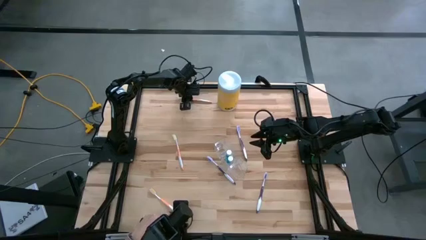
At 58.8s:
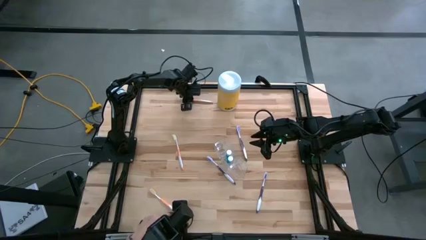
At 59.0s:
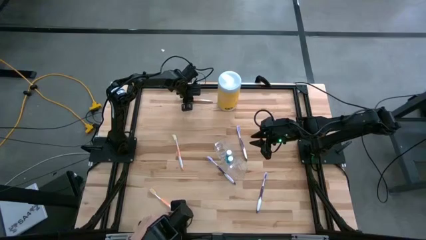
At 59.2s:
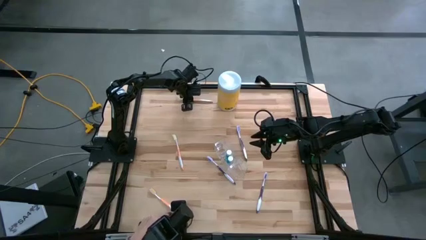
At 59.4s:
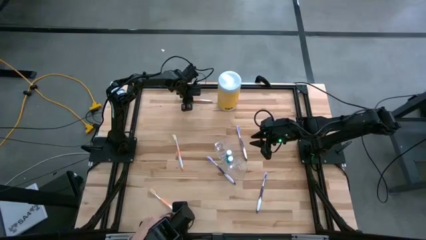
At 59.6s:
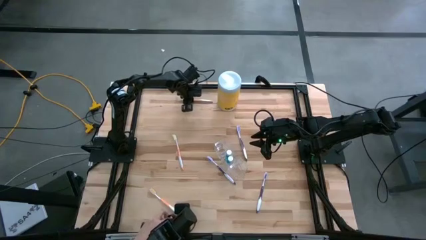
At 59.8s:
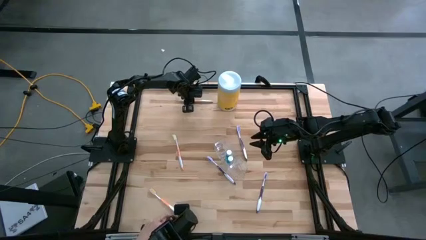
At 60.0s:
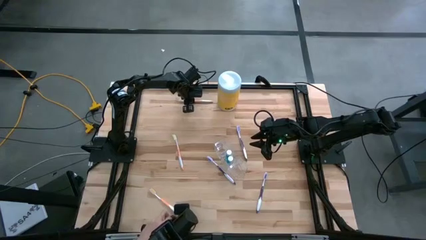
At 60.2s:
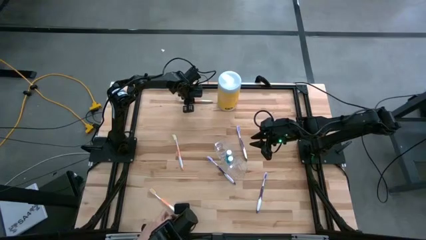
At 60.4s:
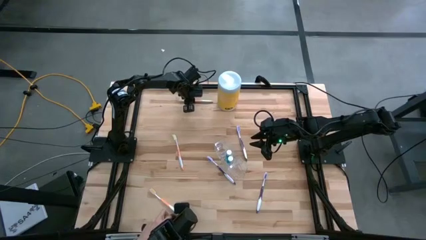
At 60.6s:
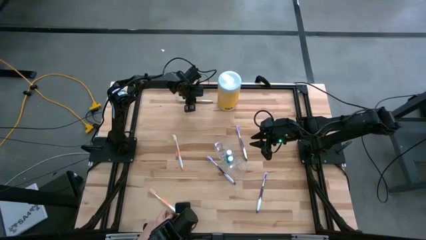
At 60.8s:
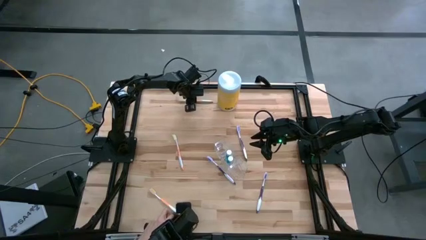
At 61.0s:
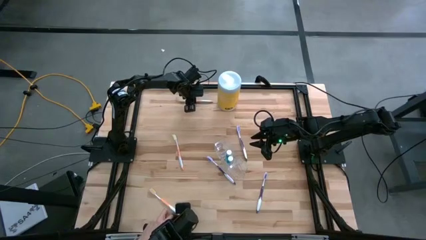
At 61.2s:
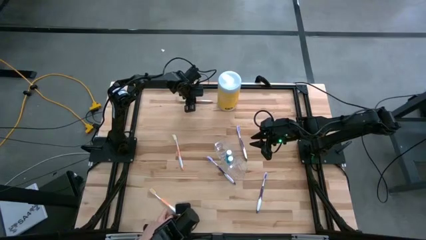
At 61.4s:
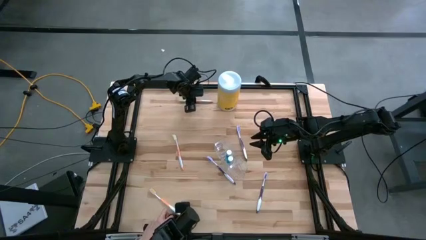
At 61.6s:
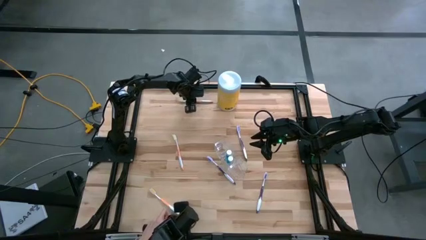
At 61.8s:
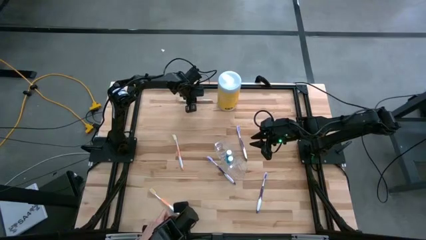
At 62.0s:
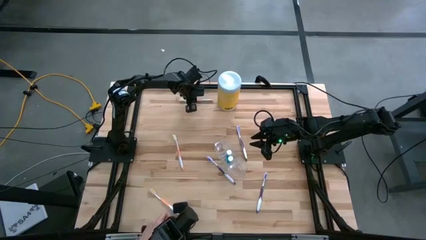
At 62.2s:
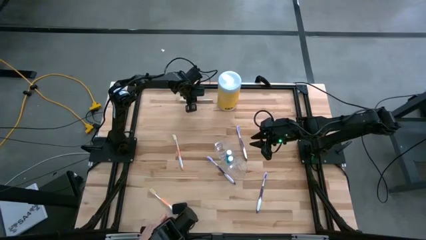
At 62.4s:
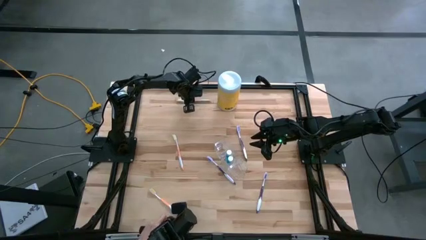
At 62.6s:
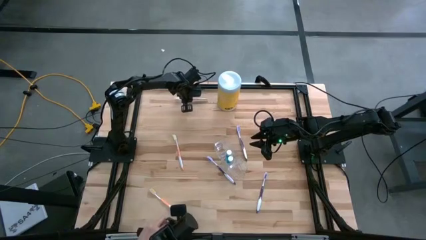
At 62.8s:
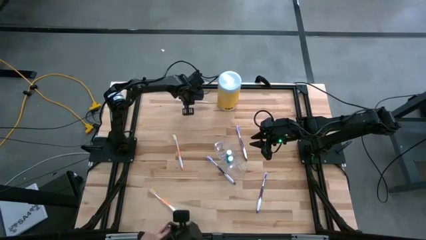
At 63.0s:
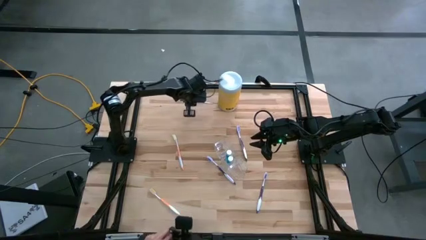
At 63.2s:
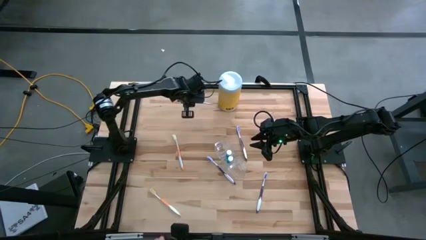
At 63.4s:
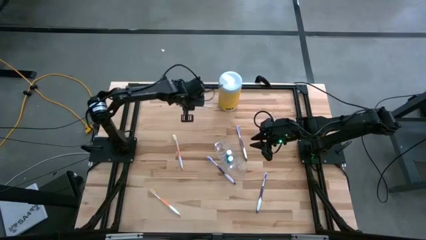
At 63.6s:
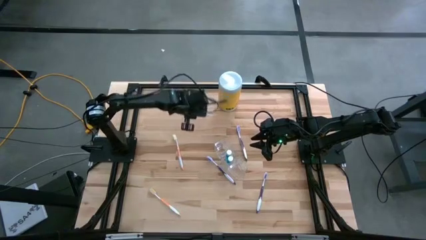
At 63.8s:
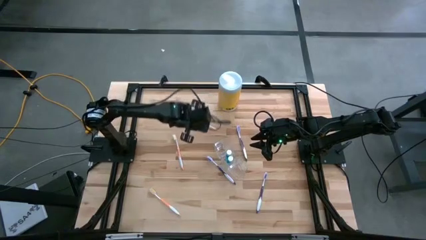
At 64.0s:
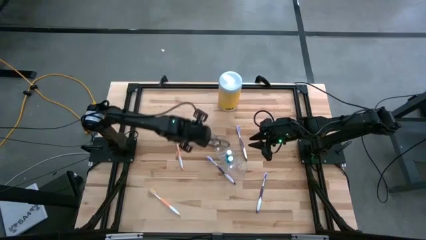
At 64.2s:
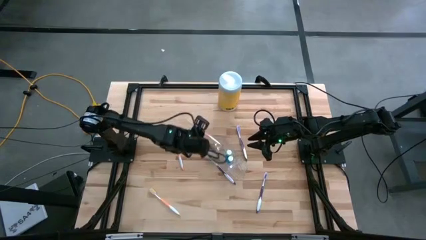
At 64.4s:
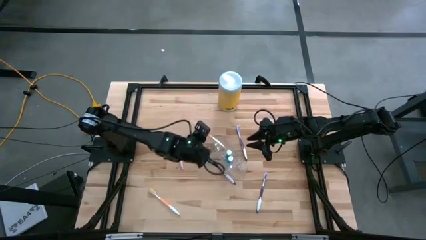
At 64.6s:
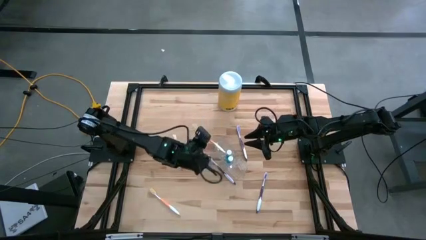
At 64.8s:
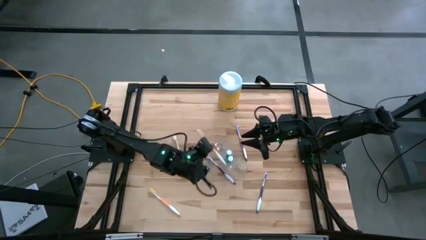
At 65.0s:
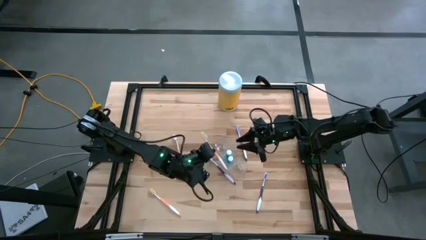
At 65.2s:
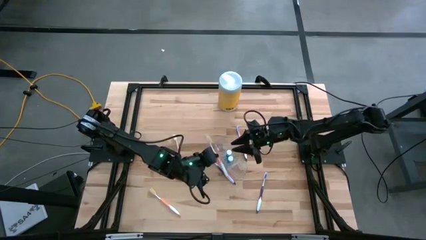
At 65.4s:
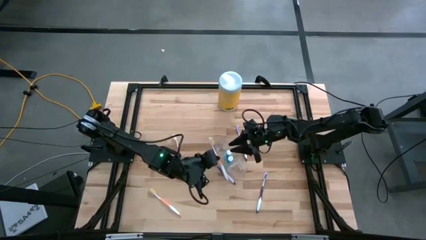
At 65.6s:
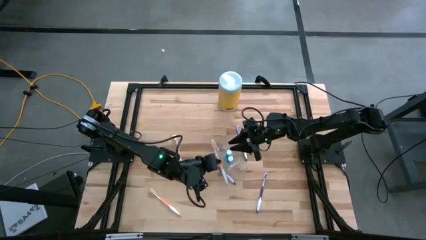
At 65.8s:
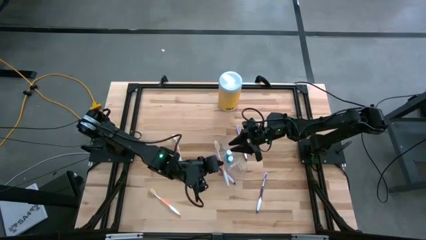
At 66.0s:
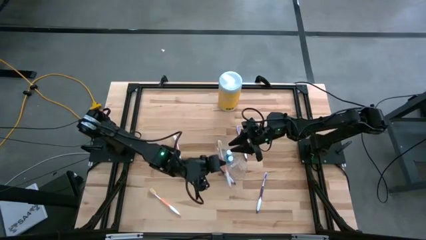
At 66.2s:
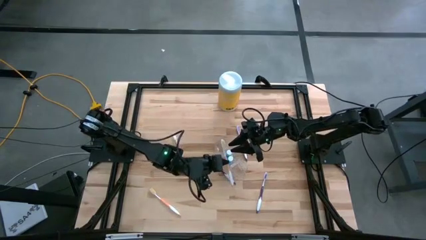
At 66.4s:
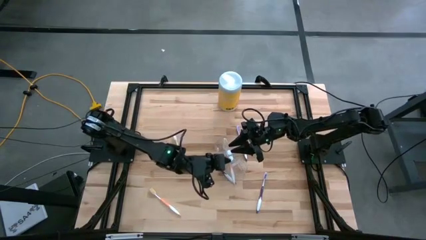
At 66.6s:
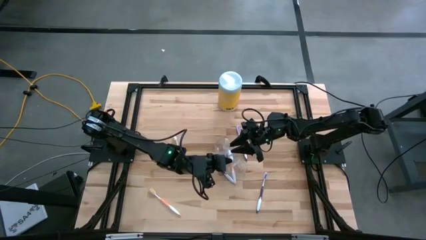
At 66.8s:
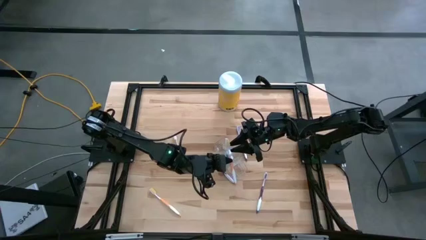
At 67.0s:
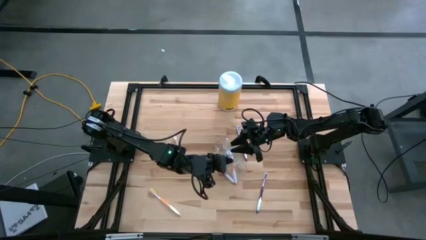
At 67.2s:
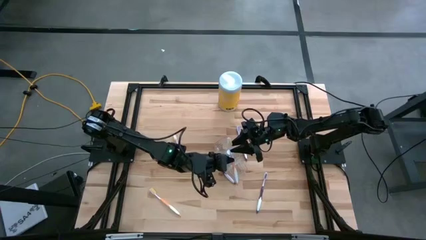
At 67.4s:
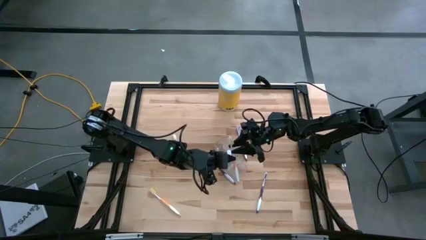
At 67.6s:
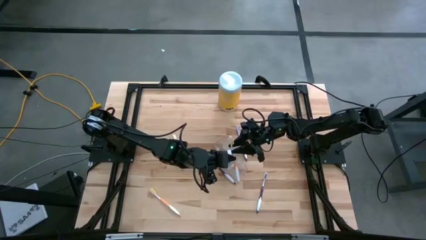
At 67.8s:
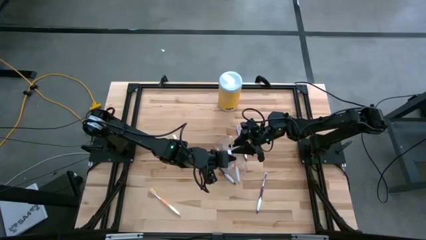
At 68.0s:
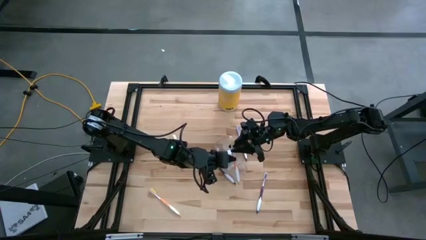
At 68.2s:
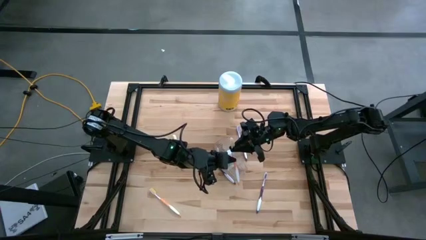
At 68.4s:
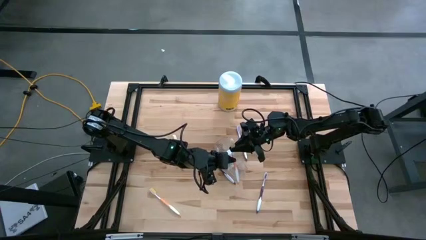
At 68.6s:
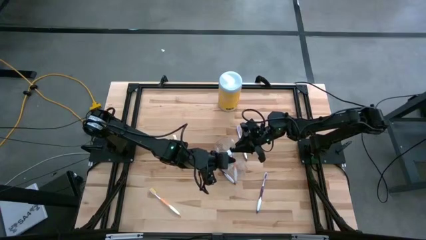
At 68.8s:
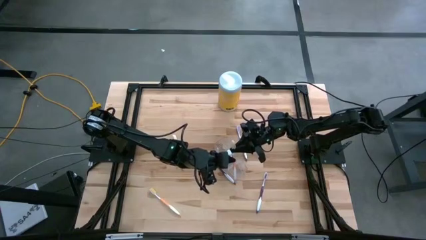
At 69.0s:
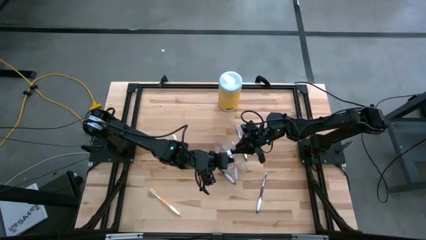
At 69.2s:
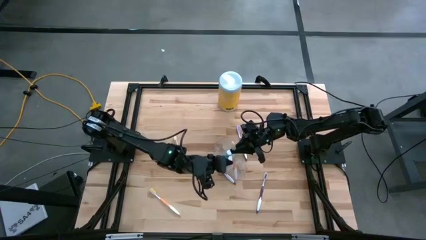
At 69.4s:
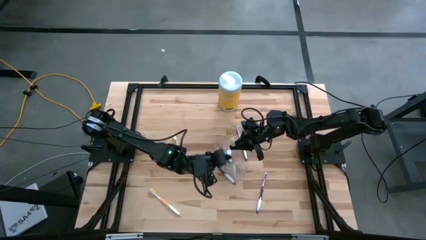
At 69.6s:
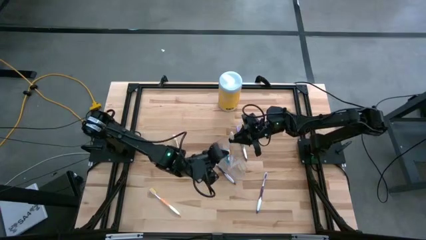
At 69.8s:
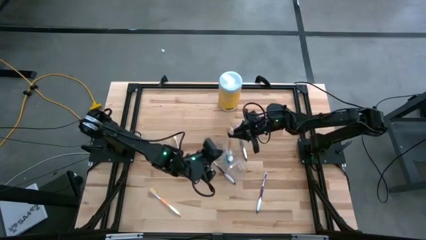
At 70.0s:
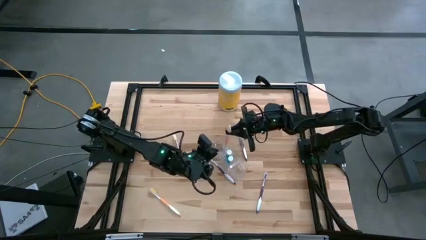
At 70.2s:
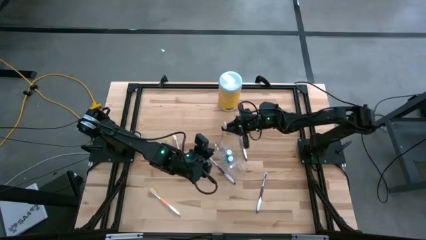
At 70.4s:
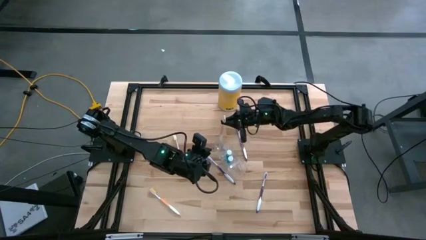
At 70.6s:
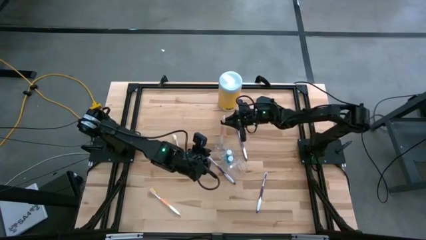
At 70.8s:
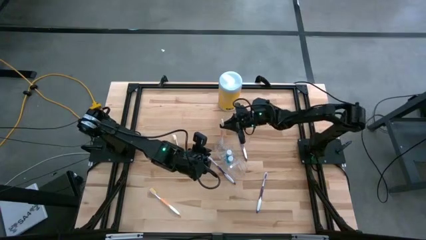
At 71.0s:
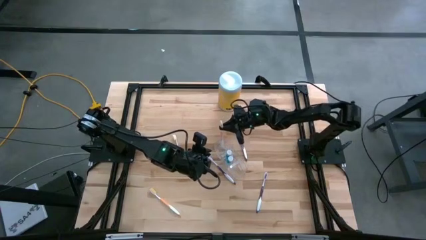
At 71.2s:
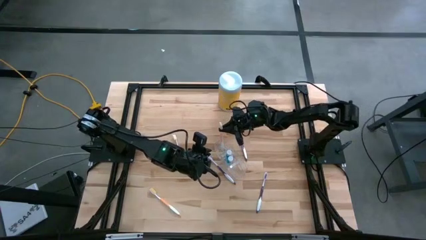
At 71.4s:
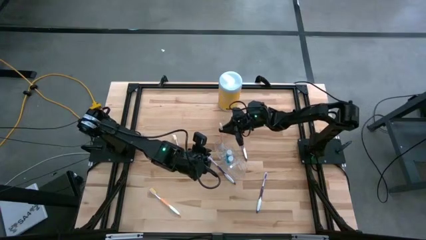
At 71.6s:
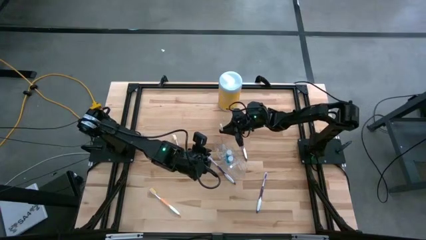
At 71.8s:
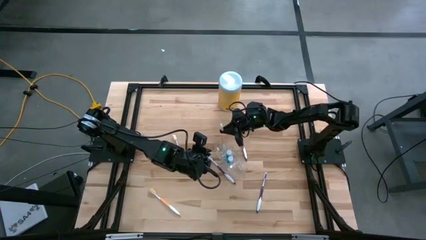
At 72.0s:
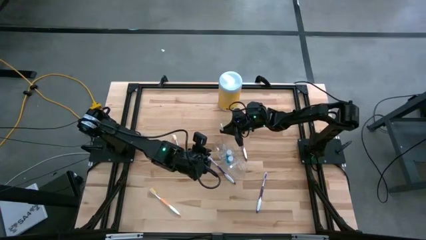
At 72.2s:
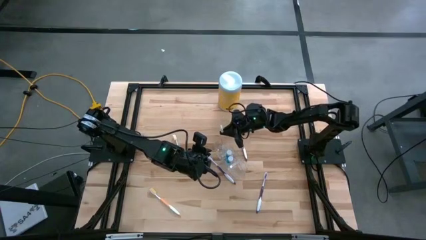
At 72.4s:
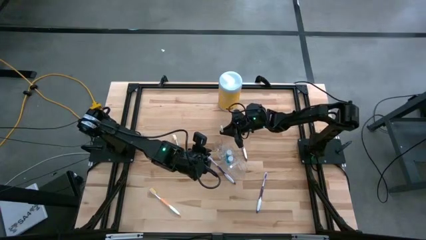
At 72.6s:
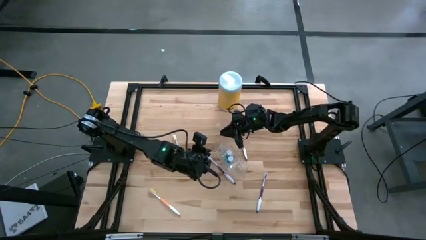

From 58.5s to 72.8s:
Task: Pick & Place toothbrushing station
Put the top orange toothbrush into the top compartment of the transparent organizer
